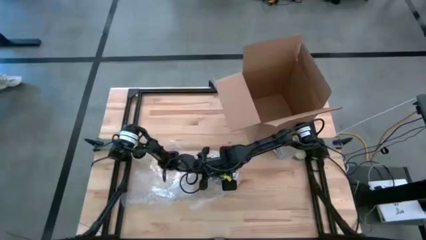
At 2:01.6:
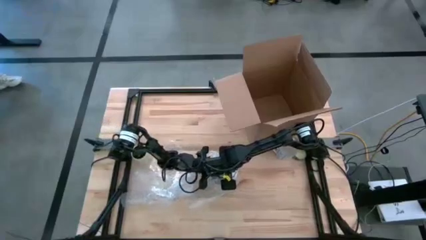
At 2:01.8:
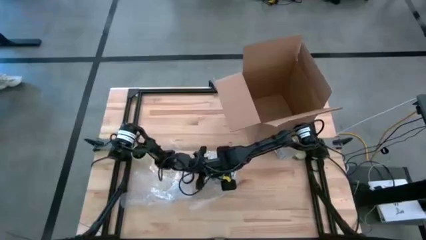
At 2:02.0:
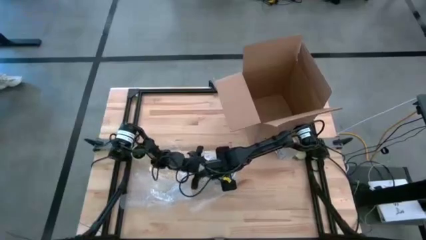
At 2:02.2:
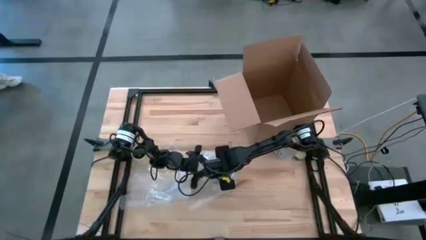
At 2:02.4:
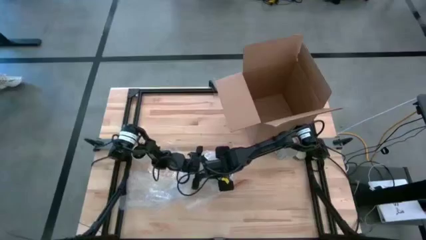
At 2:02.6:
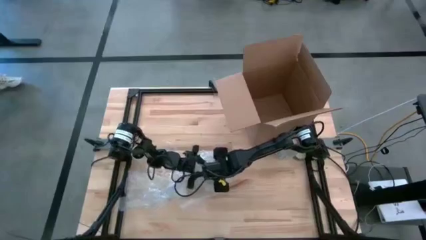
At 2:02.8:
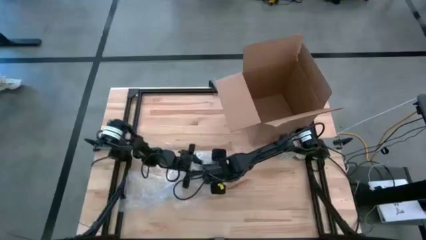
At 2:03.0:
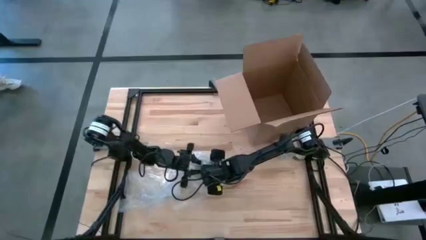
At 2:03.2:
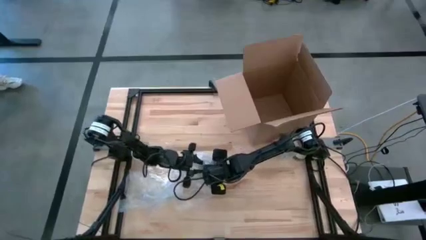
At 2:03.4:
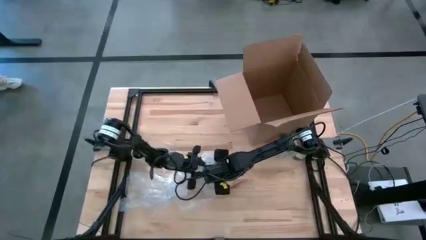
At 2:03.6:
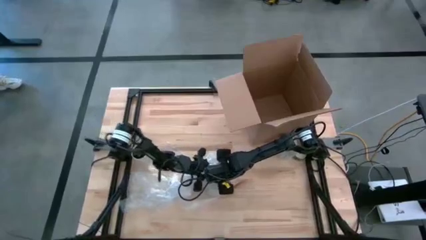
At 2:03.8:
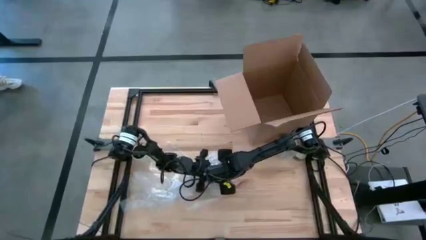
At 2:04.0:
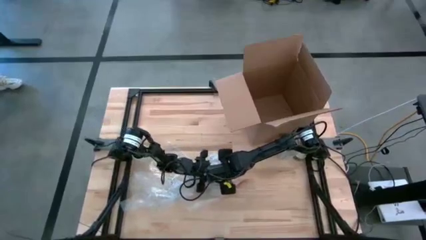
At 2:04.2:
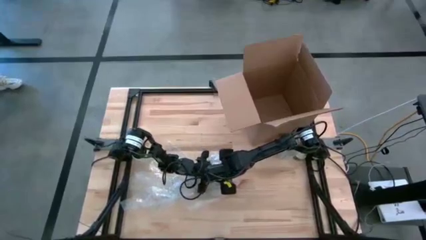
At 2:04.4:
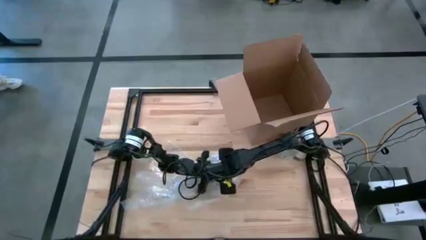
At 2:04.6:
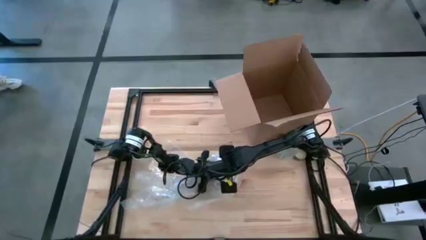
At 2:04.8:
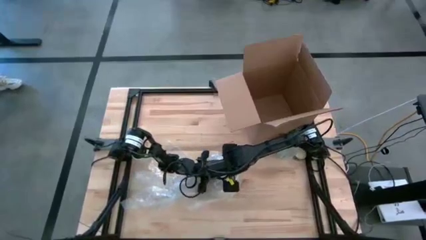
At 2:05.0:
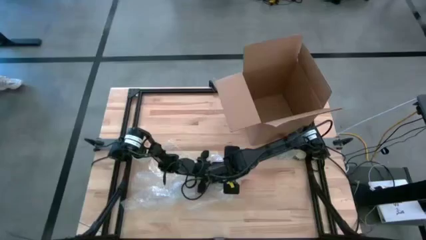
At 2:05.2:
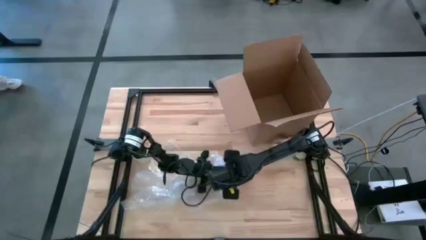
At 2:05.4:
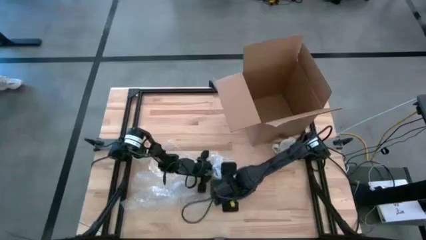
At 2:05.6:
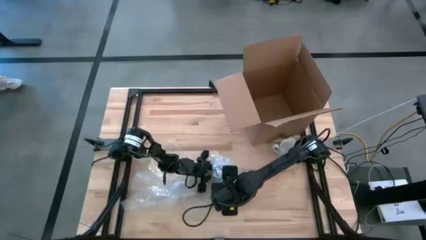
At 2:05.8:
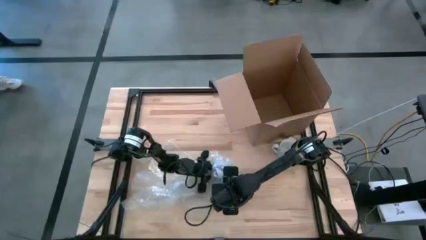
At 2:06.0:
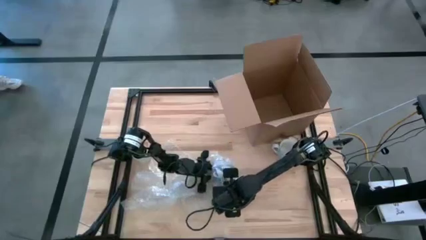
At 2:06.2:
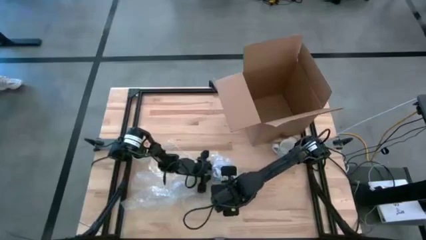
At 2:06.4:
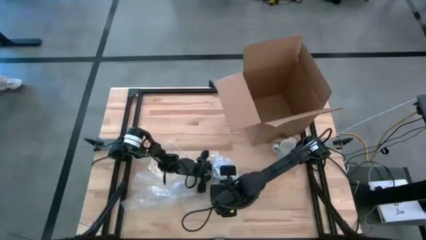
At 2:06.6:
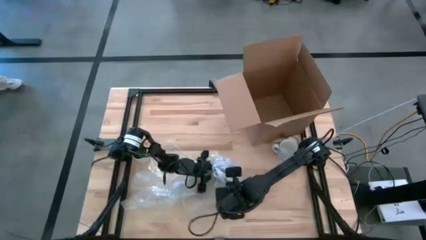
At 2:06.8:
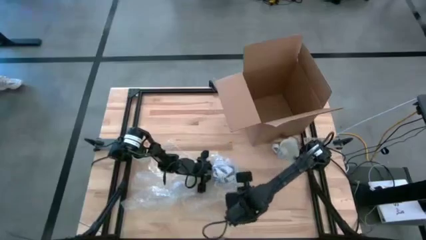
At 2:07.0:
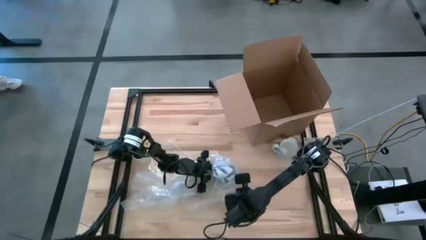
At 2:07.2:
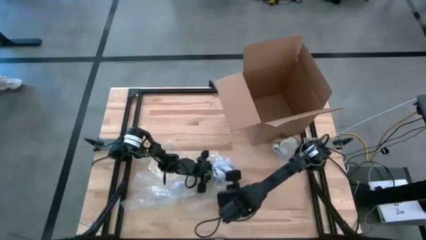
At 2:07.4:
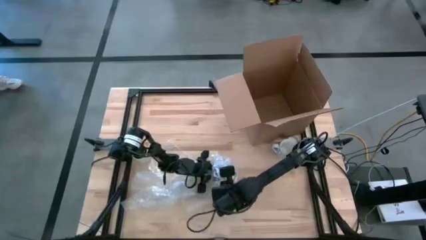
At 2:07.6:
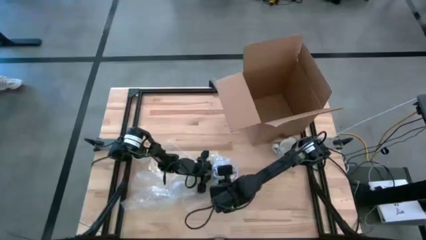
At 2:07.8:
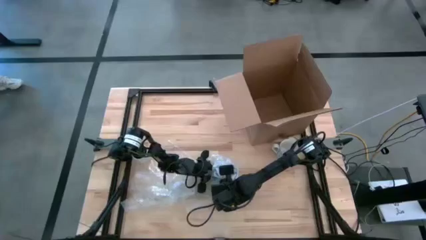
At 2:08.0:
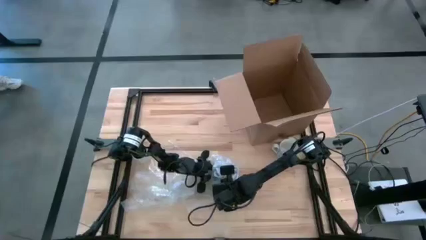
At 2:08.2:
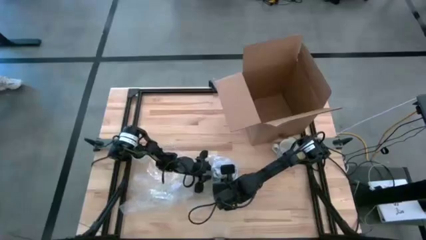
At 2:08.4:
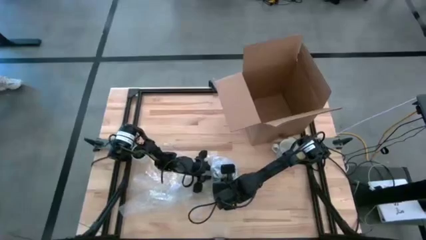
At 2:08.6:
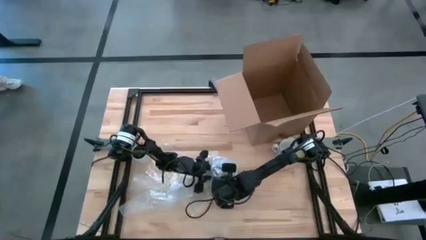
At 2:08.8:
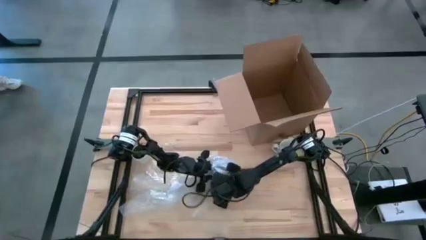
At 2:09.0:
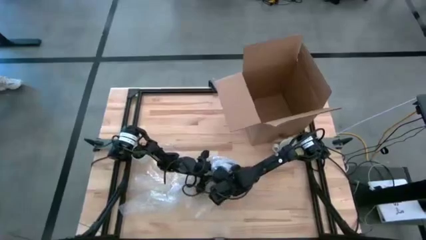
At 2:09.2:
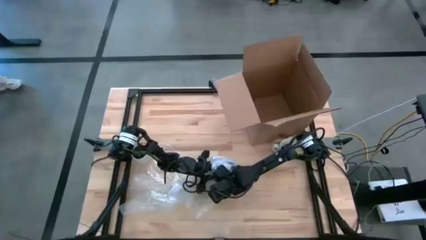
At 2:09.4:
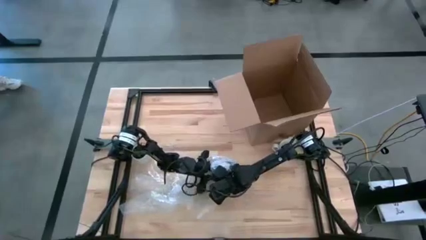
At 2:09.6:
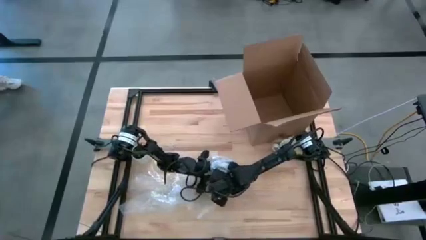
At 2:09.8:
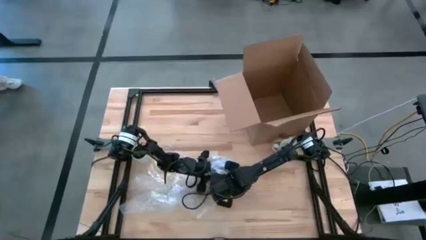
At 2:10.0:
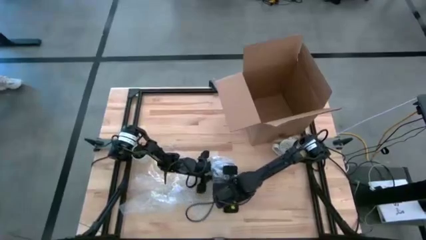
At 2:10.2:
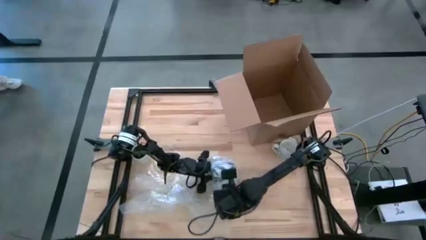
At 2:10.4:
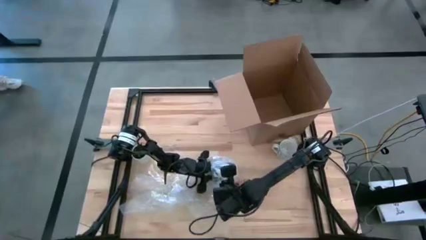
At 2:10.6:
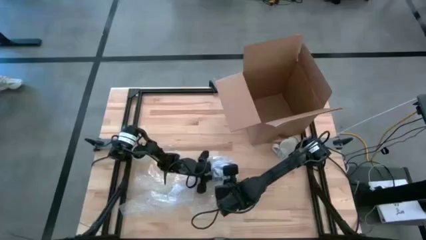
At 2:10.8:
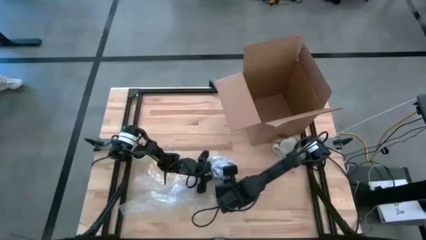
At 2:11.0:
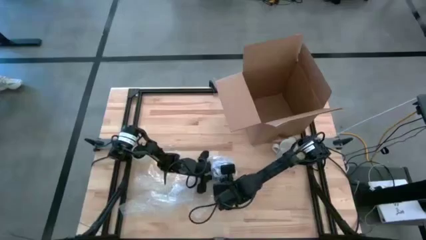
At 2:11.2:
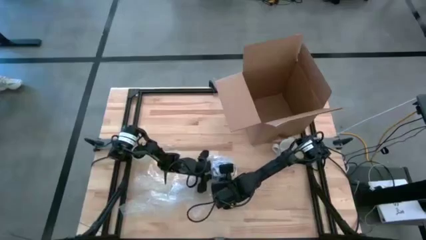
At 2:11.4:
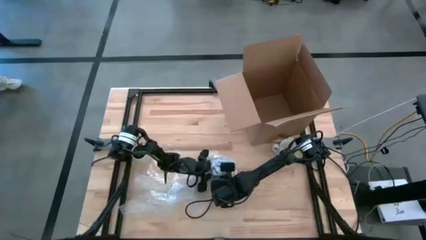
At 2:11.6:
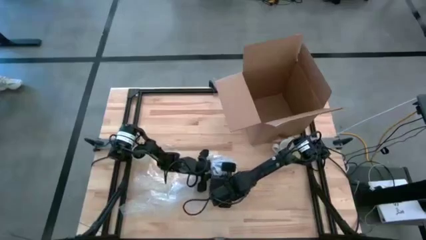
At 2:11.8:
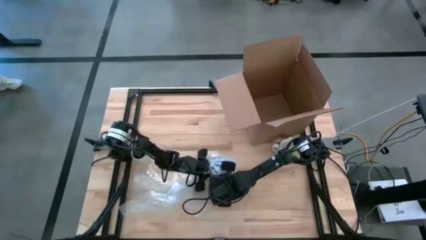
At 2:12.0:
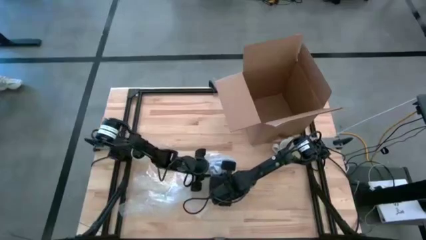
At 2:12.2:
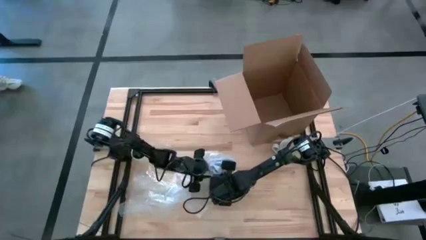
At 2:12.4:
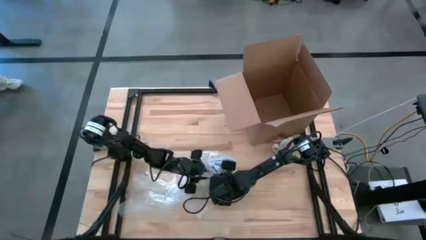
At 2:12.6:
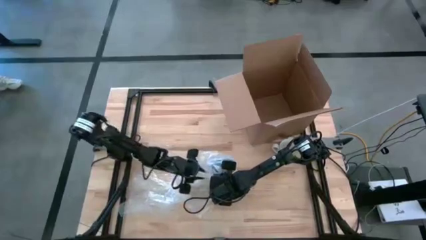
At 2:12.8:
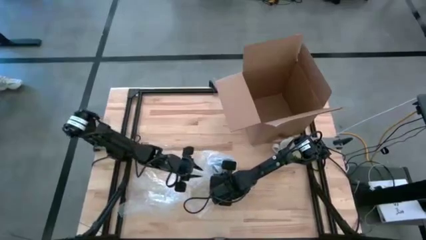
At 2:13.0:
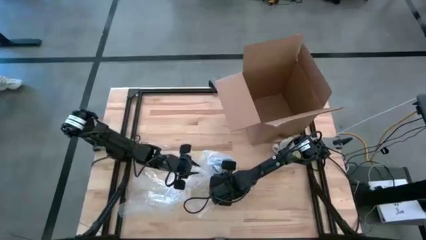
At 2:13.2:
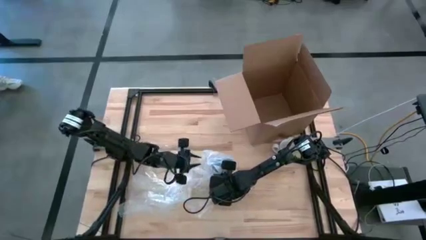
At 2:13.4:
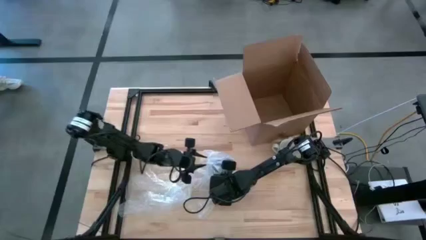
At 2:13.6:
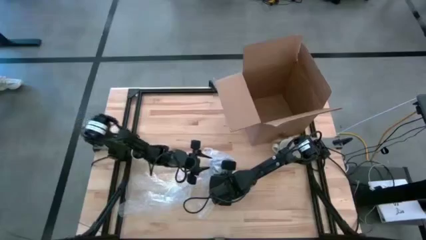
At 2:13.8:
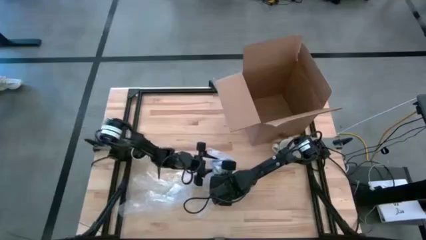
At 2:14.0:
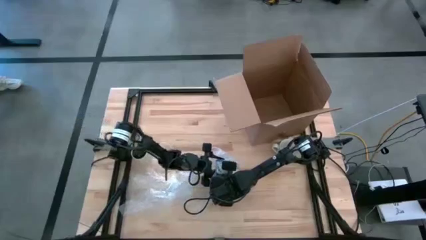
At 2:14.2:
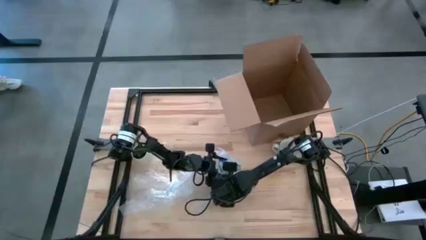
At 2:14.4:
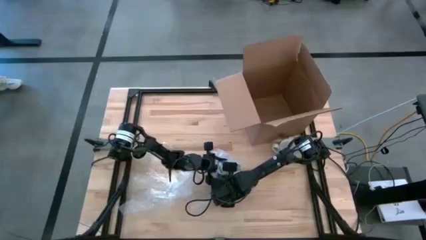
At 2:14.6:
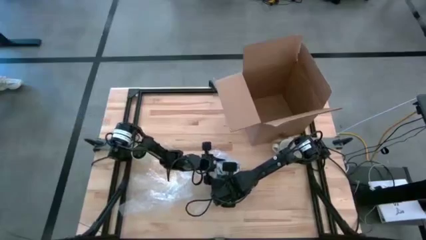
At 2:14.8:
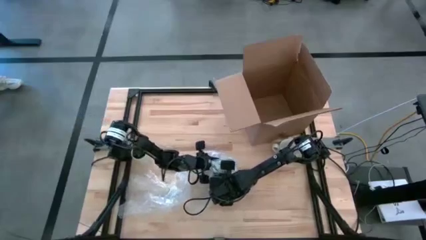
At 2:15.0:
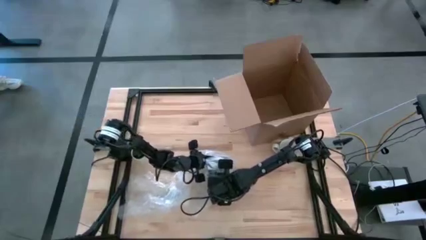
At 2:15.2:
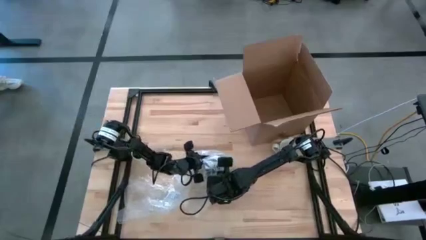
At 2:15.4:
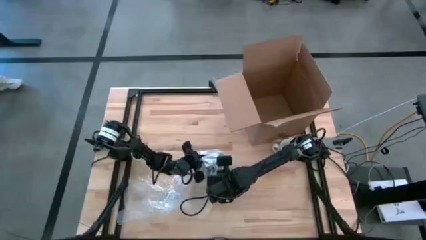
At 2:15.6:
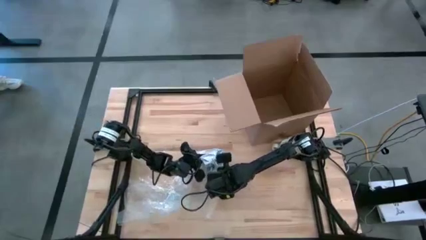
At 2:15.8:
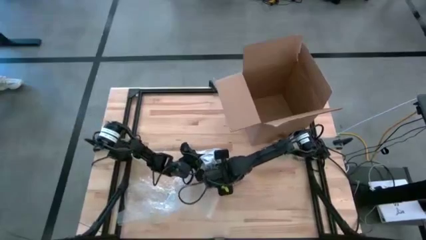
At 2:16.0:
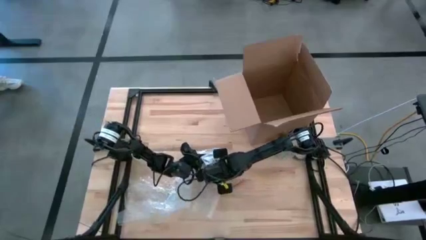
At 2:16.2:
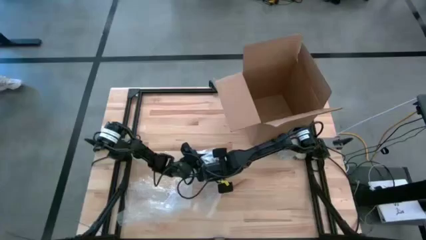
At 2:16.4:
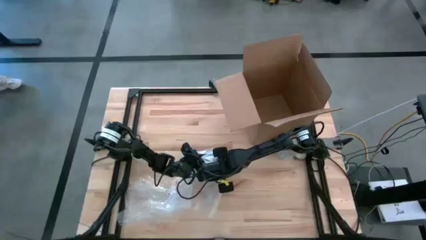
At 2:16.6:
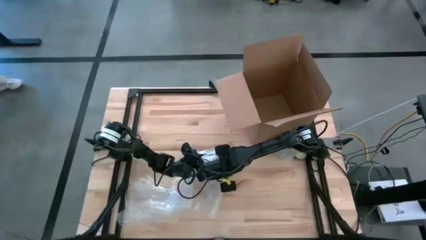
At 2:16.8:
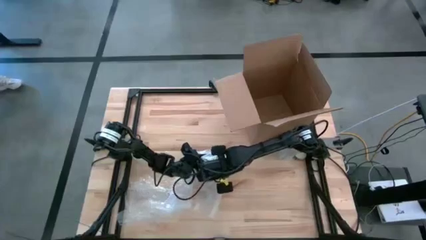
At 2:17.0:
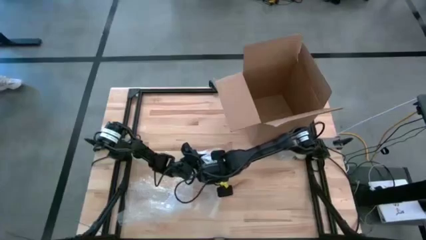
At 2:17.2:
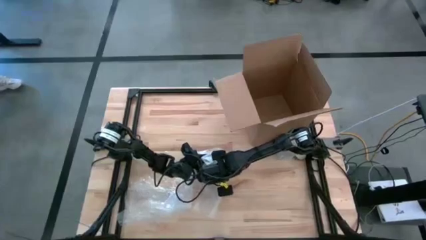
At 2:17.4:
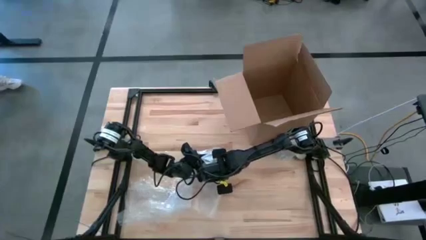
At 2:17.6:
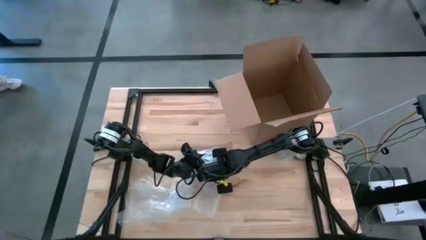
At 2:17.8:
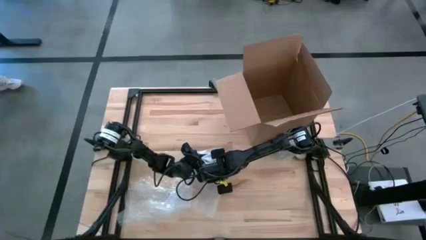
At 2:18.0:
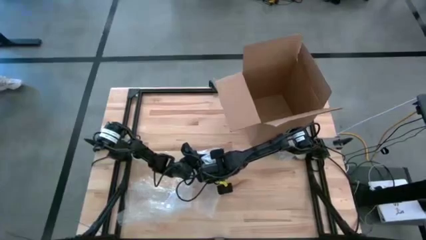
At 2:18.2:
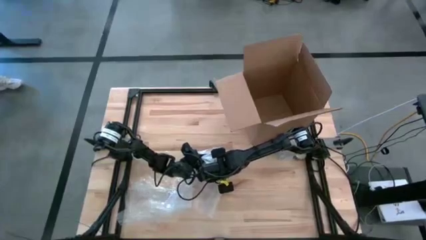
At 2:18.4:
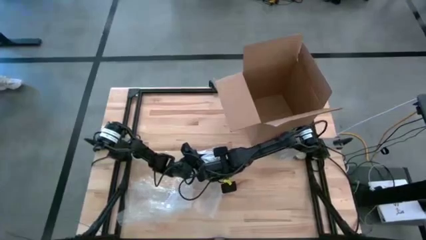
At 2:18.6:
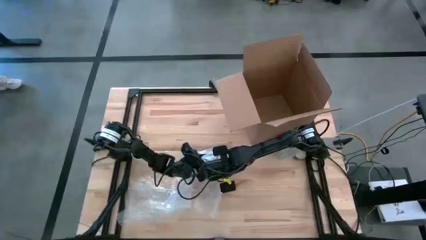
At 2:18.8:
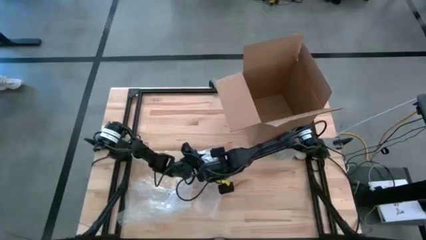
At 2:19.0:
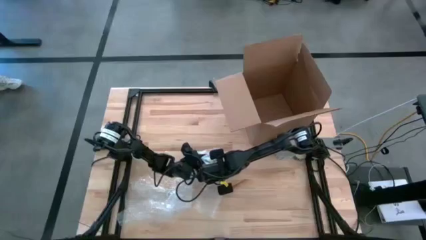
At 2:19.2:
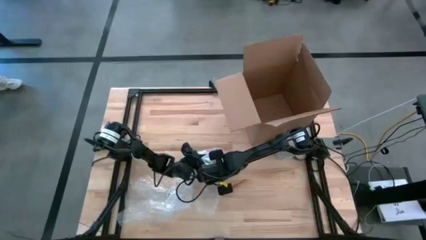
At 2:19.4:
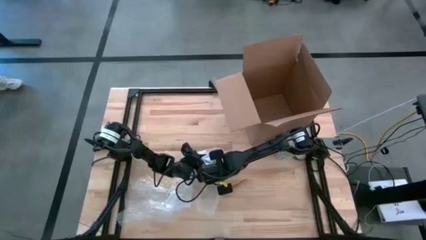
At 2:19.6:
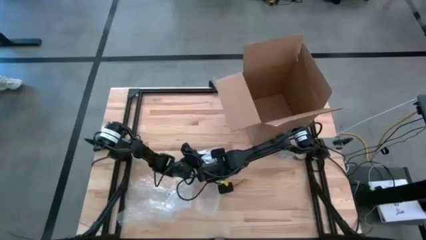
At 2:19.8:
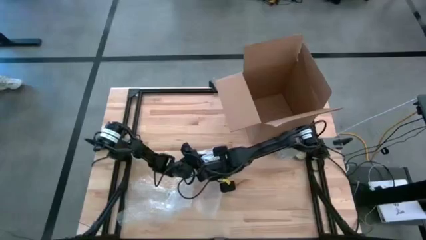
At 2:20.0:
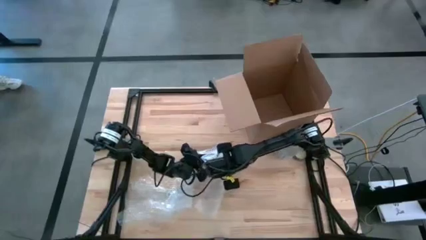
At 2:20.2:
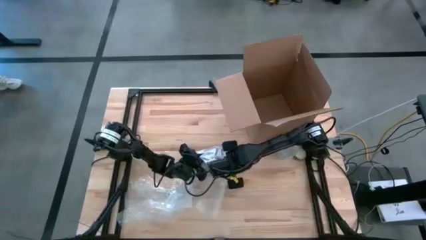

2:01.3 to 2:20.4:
Task: wrap mug
Wrap the blue mug with the right bubble wrap
